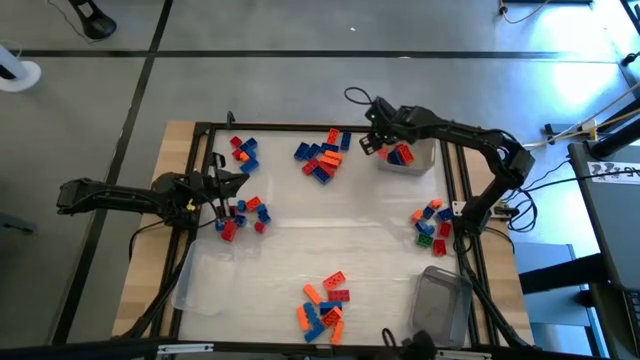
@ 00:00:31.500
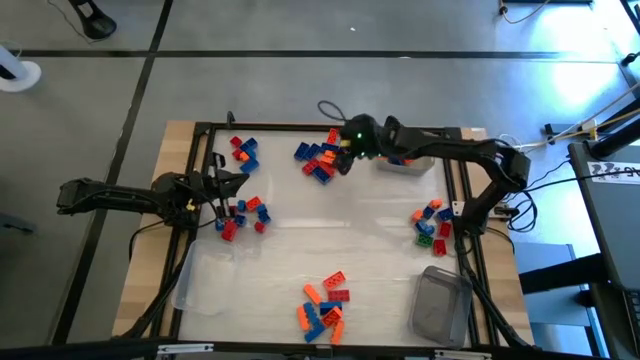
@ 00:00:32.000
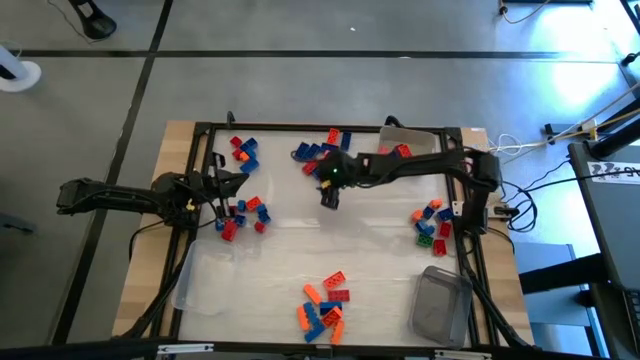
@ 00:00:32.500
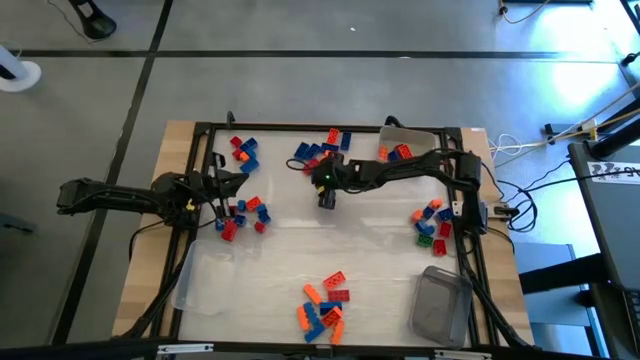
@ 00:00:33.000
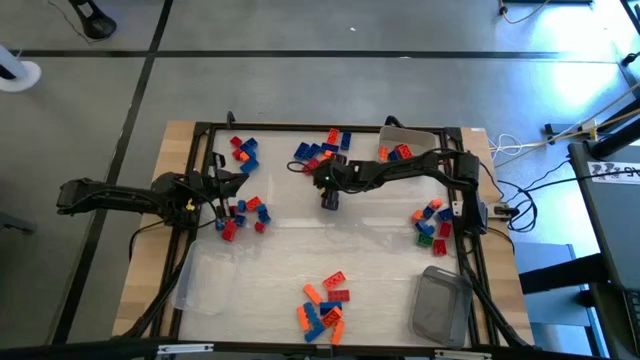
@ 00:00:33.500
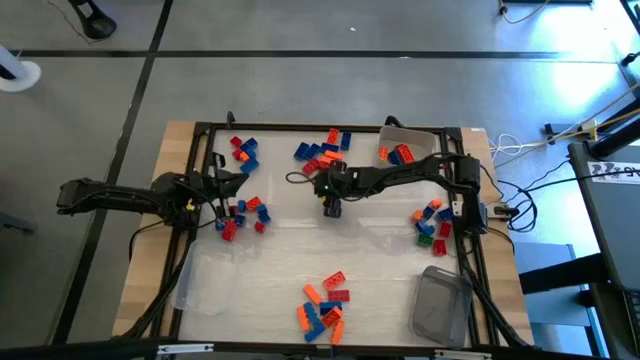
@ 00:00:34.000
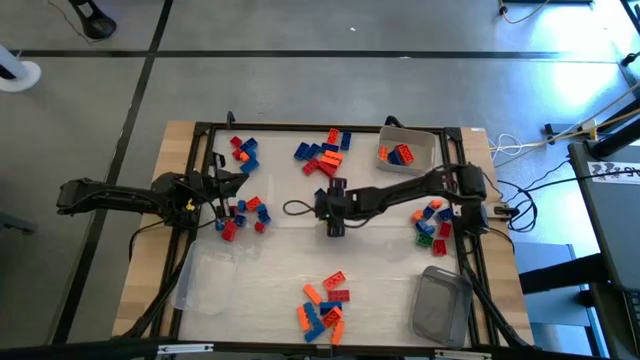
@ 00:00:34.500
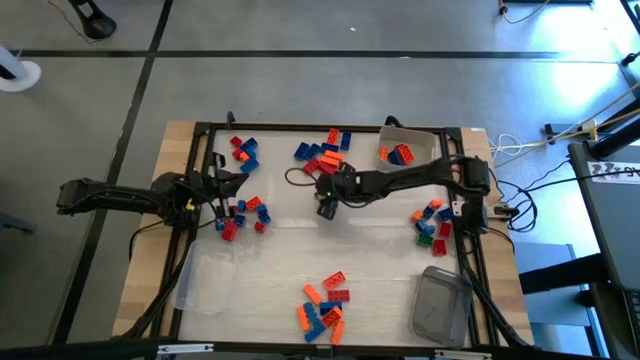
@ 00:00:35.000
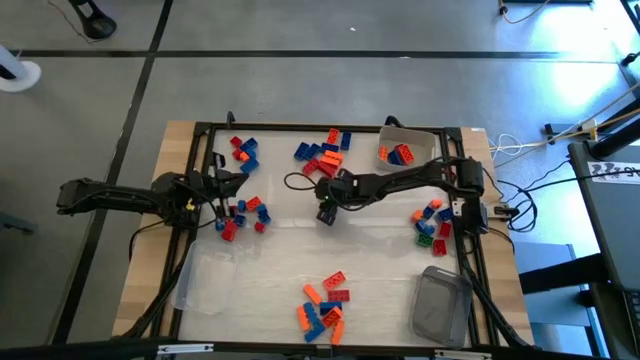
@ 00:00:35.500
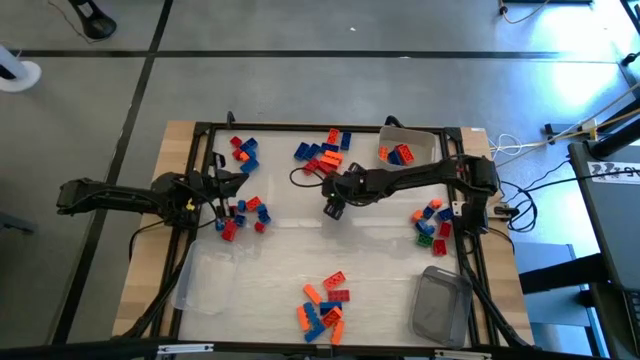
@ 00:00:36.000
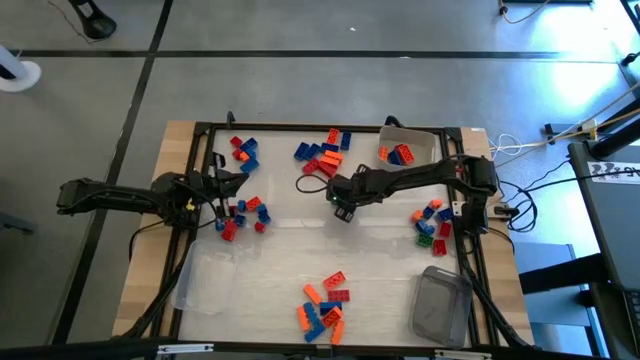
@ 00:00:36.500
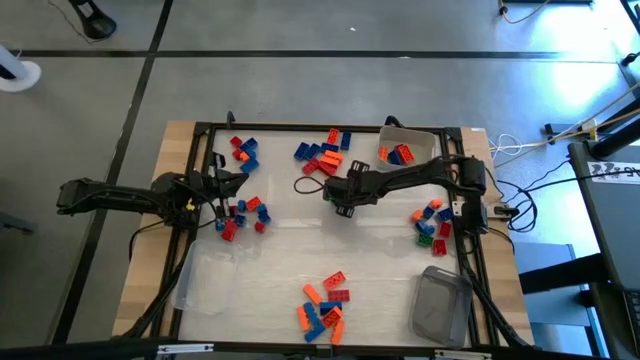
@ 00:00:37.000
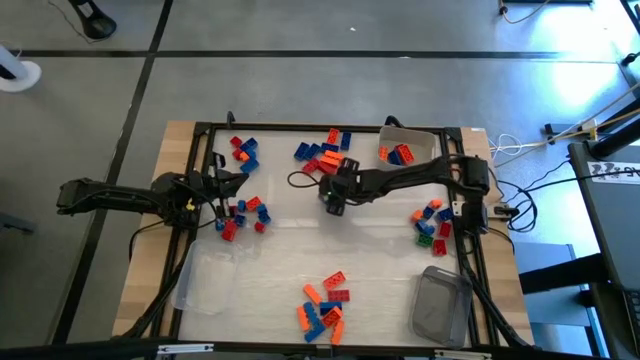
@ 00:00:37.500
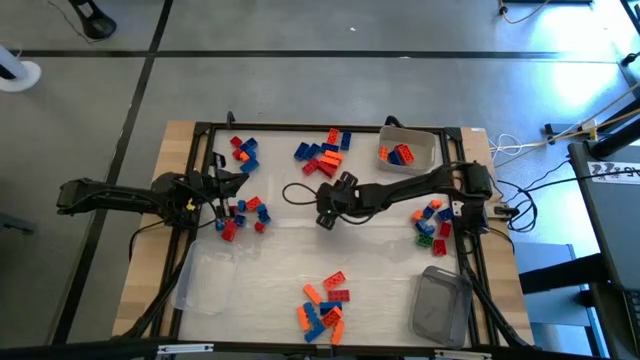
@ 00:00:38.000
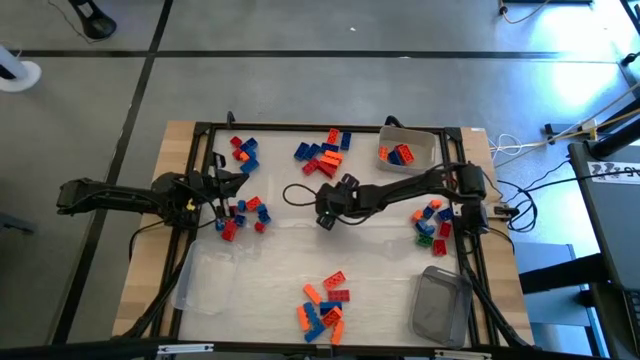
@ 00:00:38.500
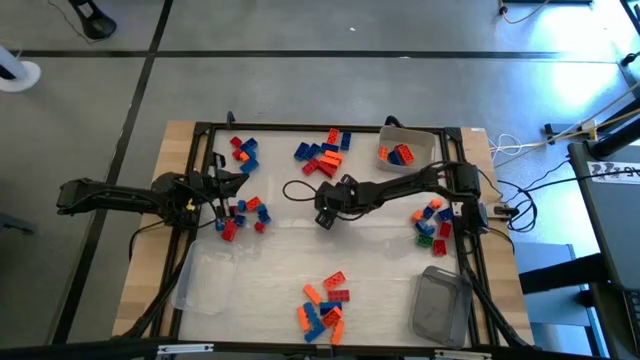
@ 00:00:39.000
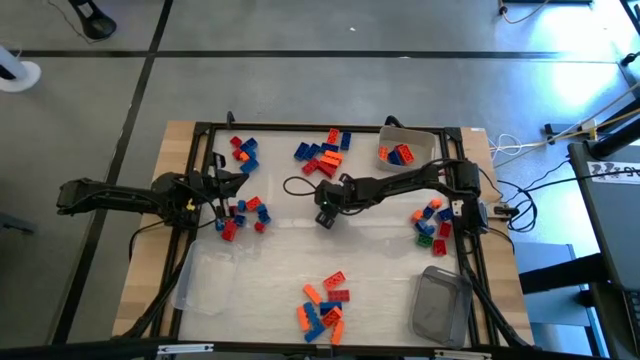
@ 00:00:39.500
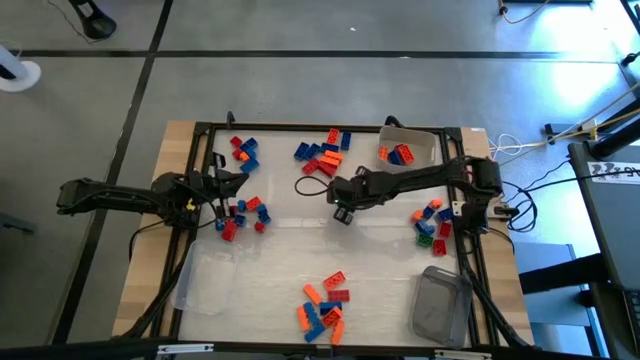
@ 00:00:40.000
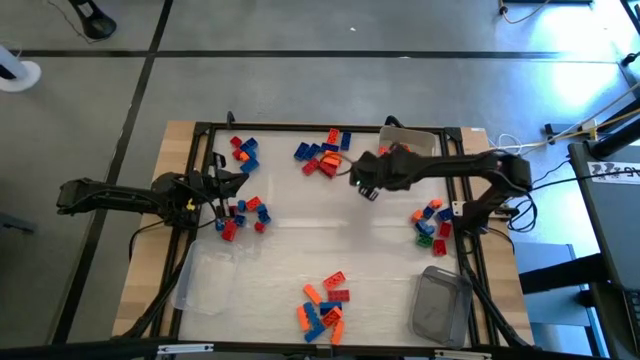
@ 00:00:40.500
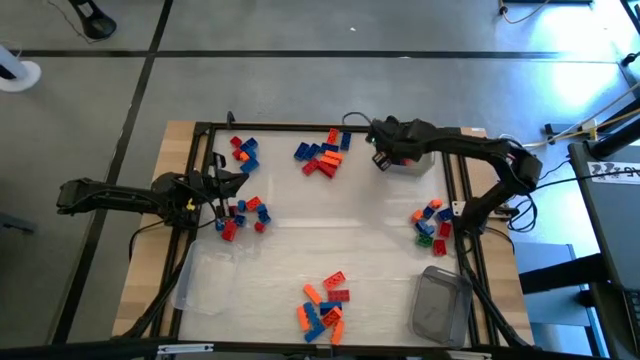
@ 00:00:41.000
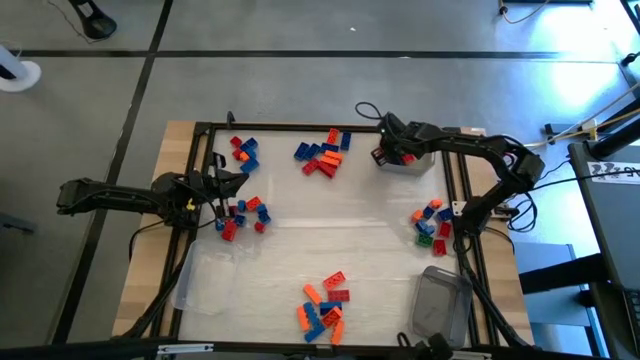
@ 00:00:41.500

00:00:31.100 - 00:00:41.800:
Task: Sort blocks by size
Put the blue game piece into the gray bin

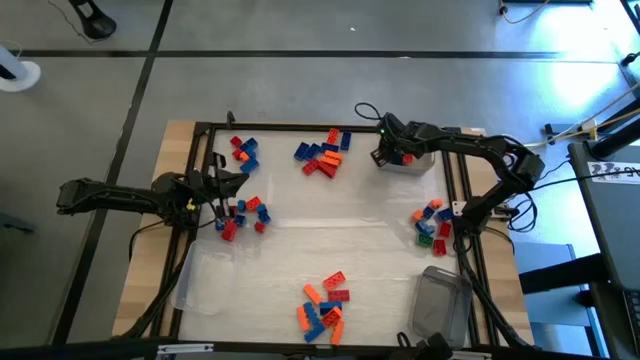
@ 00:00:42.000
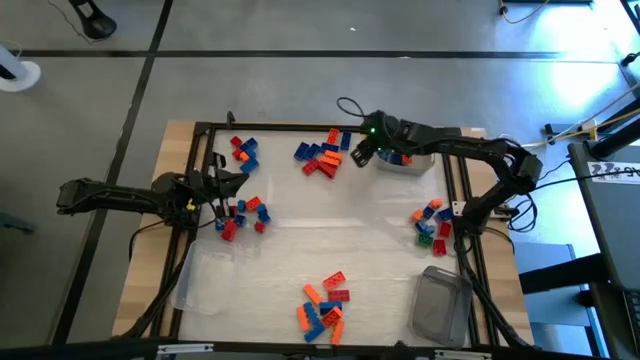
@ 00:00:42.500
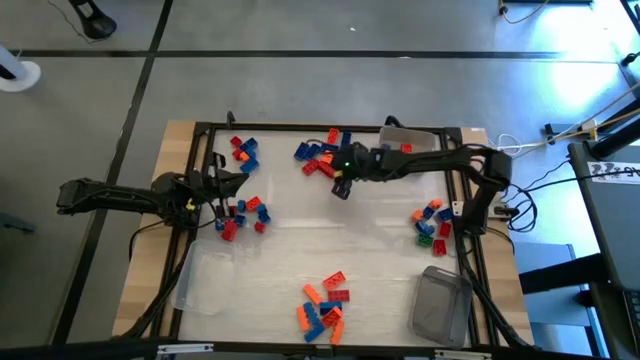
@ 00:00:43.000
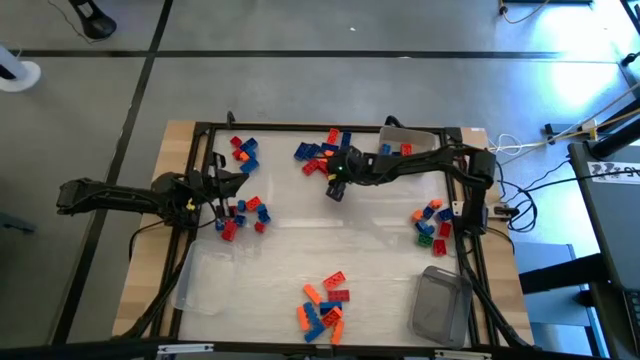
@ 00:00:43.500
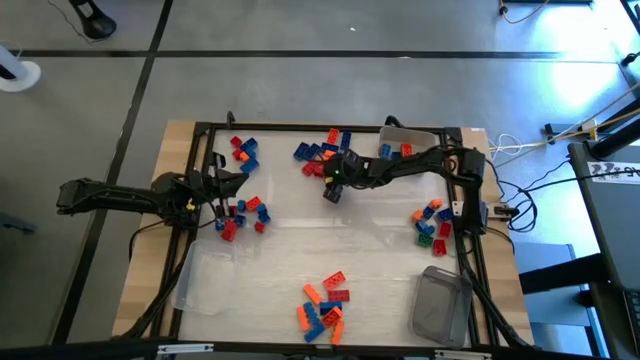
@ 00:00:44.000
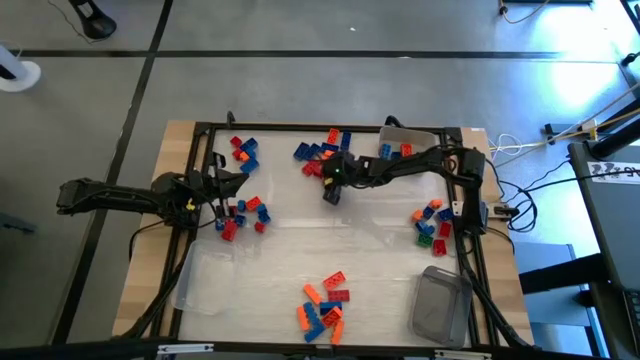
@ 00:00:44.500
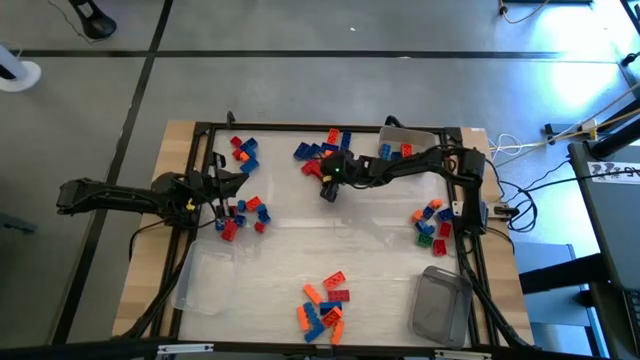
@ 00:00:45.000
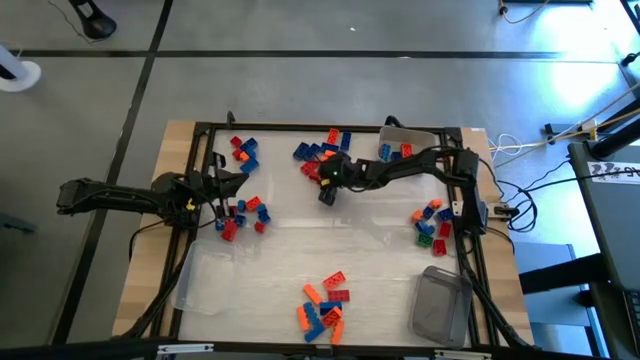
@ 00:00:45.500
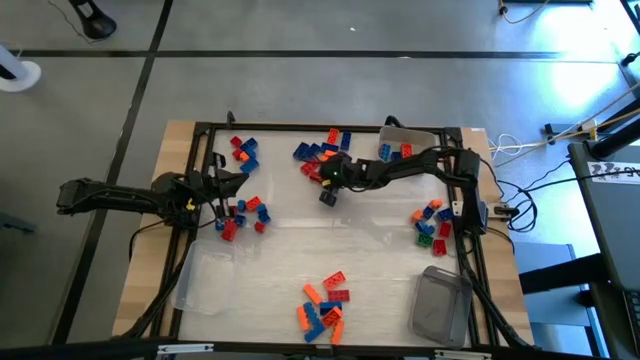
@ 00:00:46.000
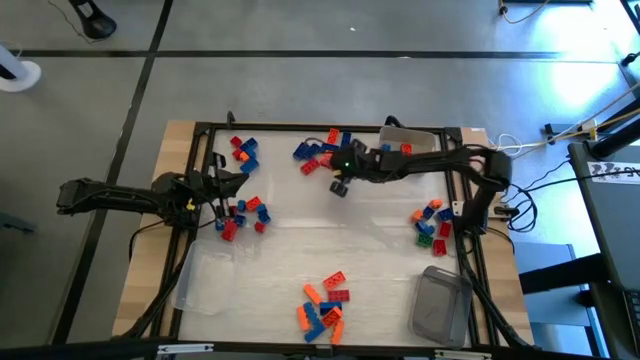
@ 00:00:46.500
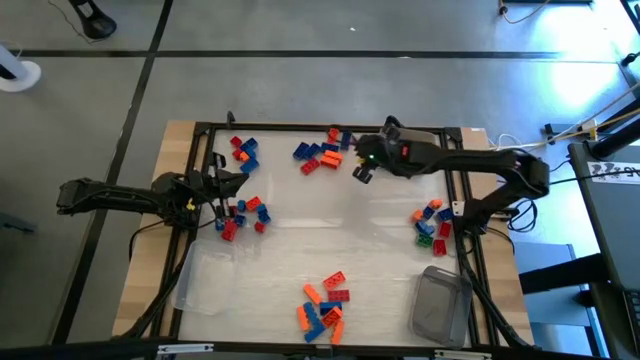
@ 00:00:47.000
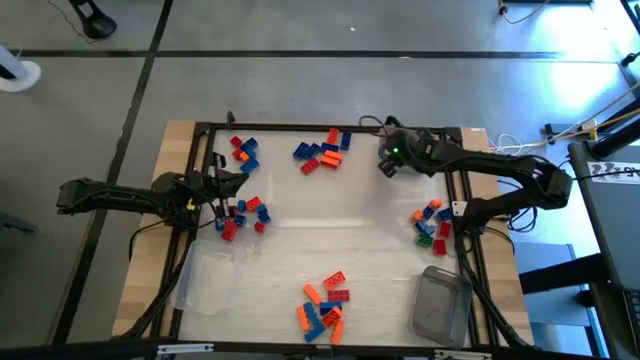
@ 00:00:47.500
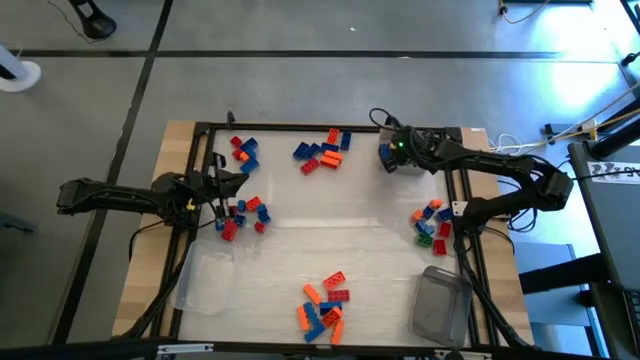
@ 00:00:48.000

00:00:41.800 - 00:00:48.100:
Put the red game piece into the gray bin
